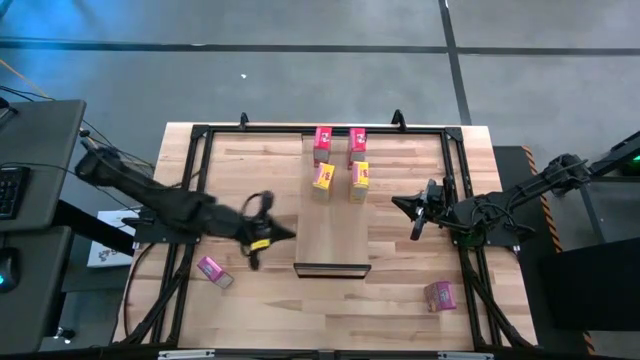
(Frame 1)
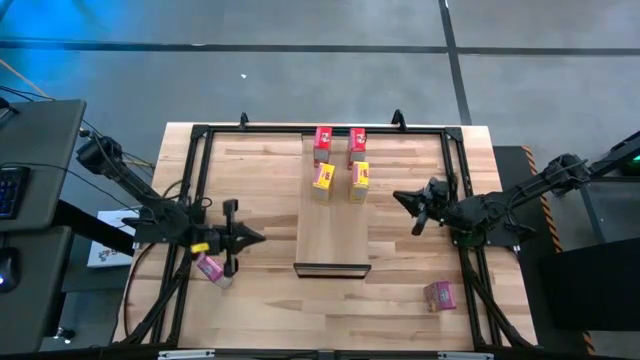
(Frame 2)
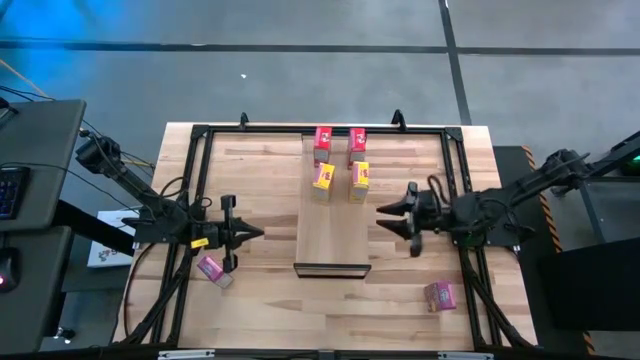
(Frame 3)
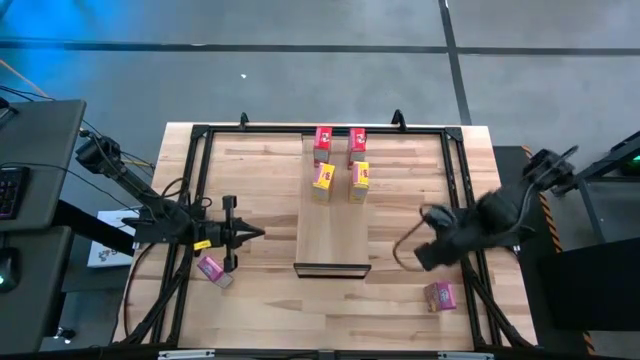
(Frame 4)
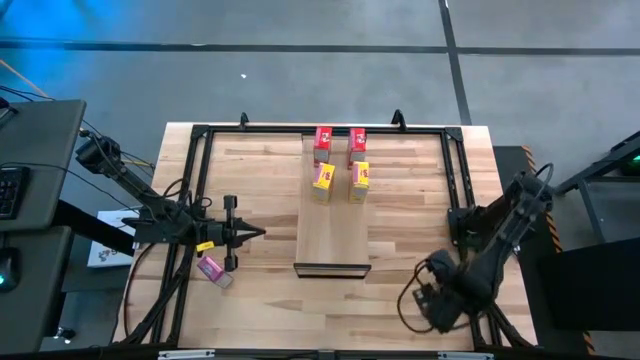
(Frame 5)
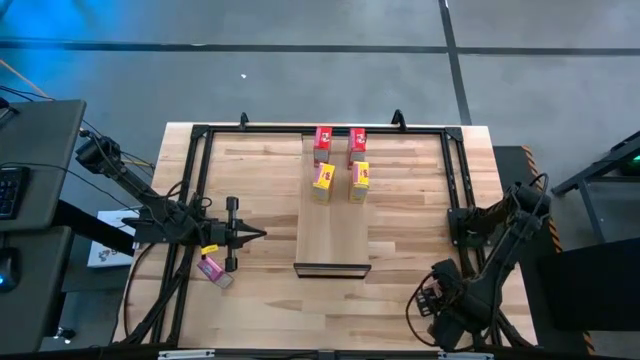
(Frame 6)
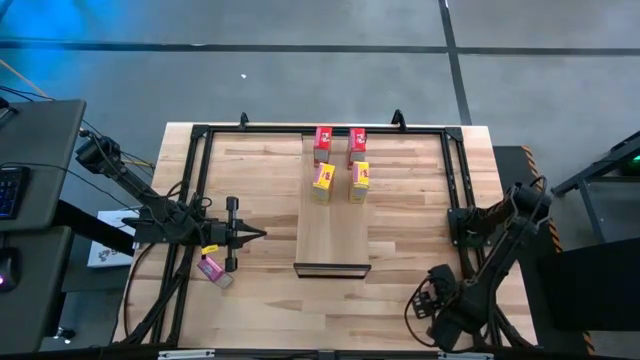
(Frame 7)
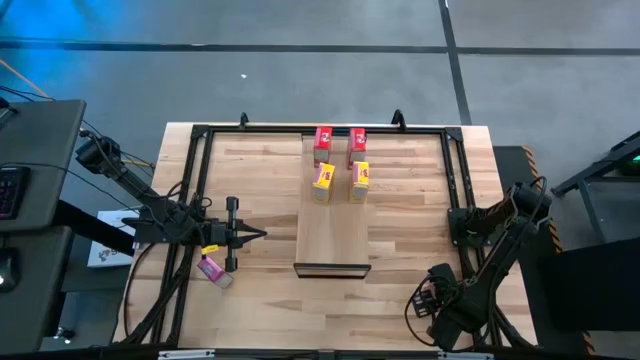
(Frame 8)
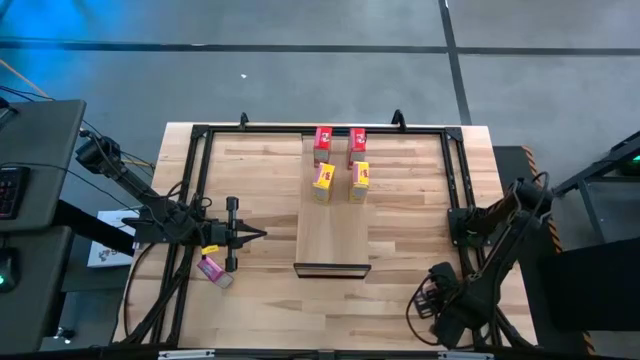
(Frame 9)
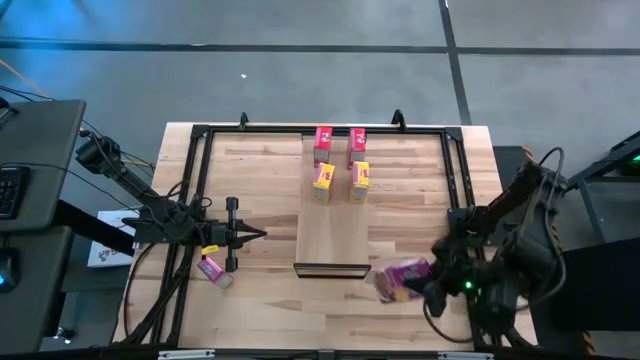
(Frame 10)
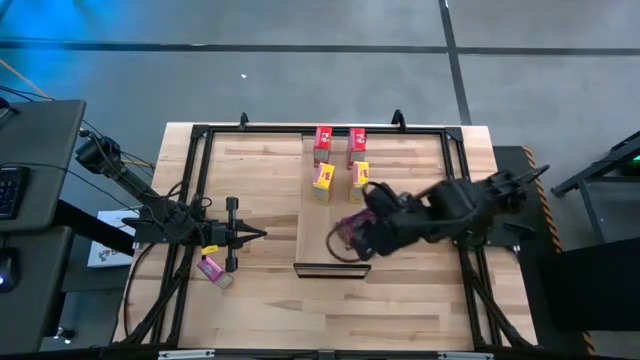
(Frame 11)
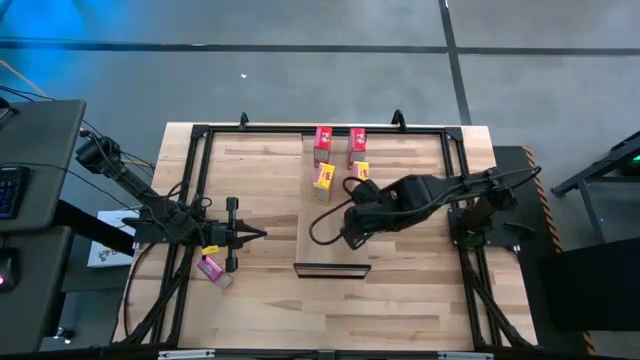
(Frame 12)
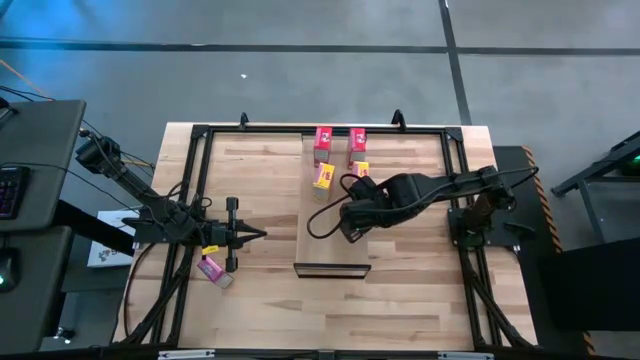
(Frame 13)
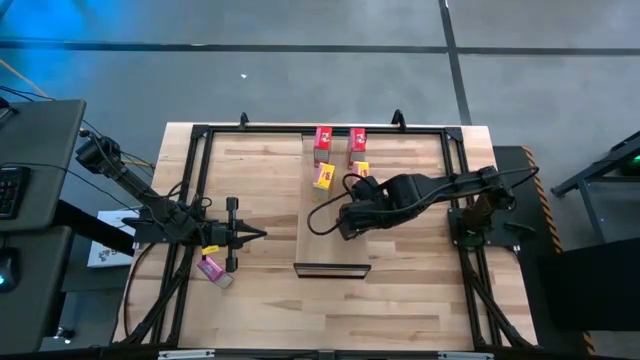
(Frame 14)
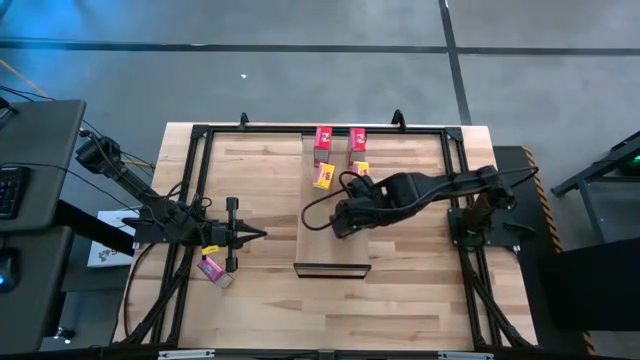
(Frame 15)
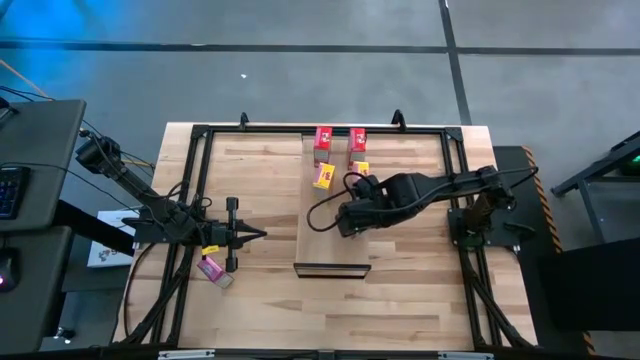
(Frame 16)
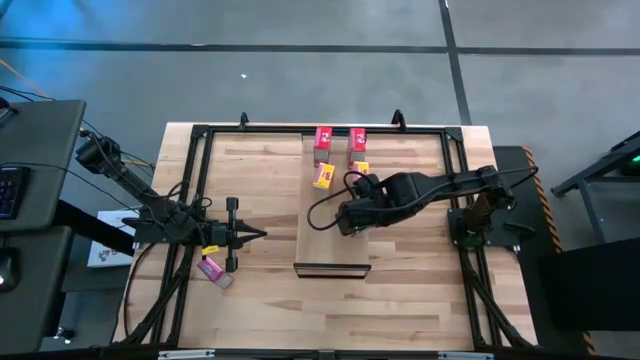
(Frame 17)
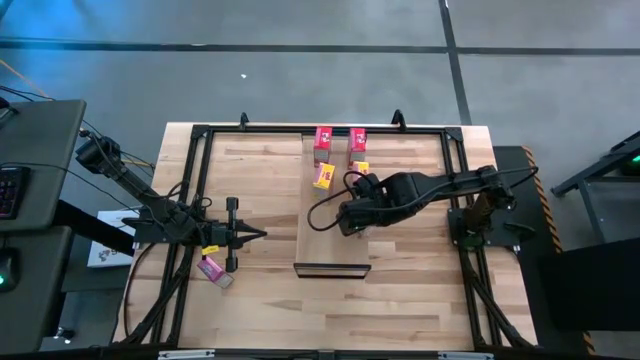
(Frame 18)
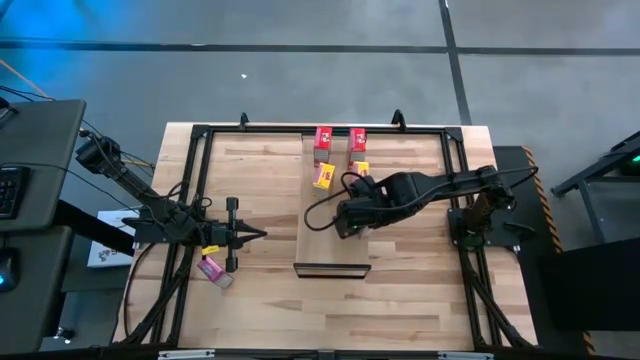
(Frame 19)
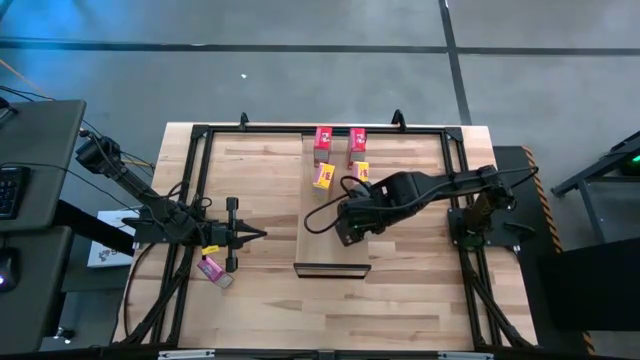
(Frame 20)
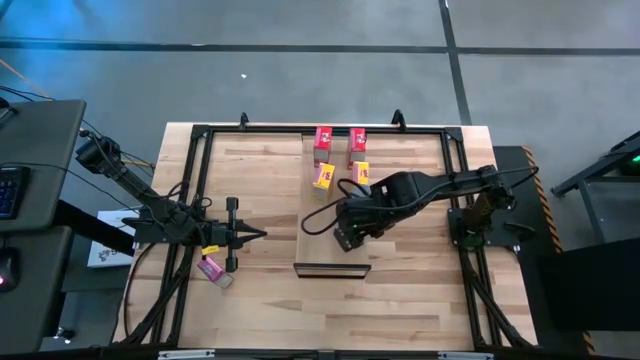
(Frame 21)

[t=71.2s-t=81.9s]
Task: Stack cereal on shelf
Put the right purple cereal box on the shelf

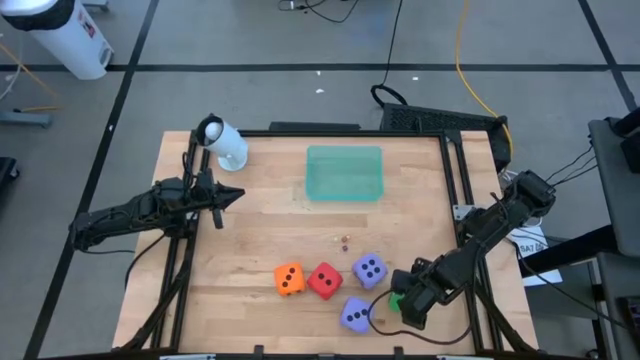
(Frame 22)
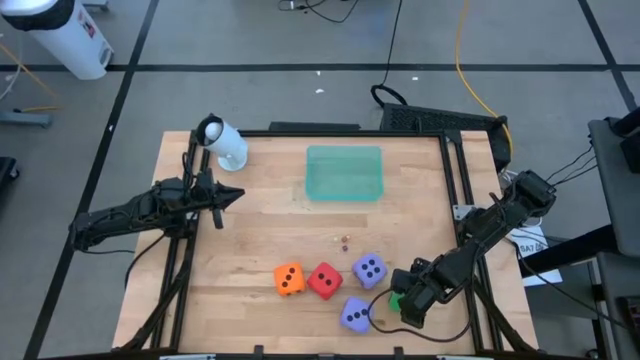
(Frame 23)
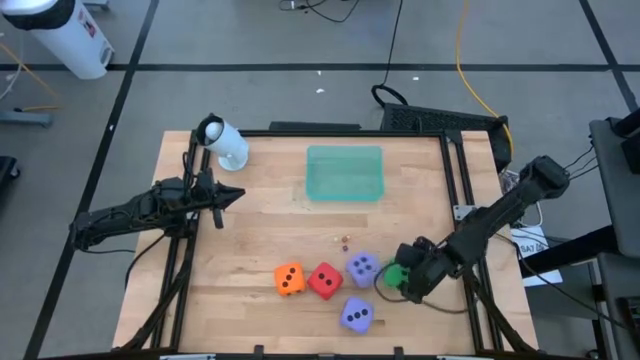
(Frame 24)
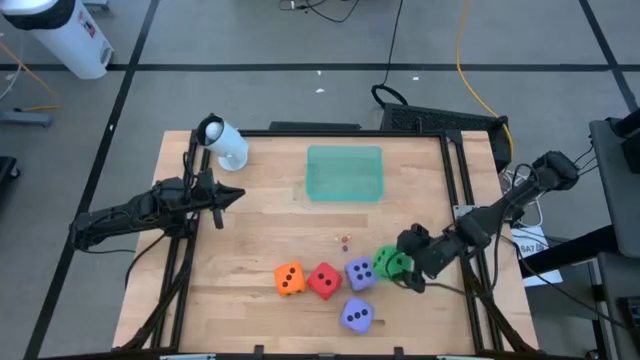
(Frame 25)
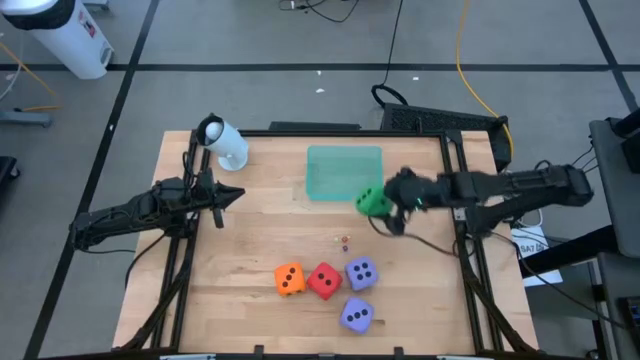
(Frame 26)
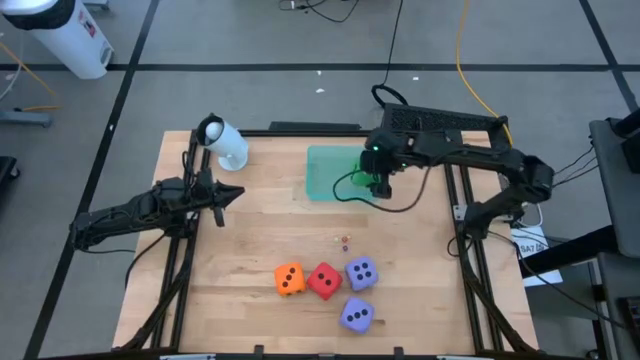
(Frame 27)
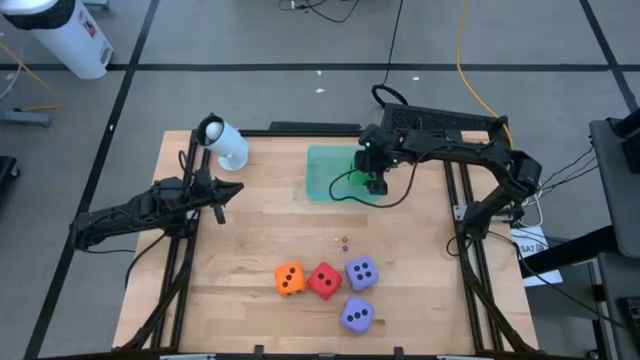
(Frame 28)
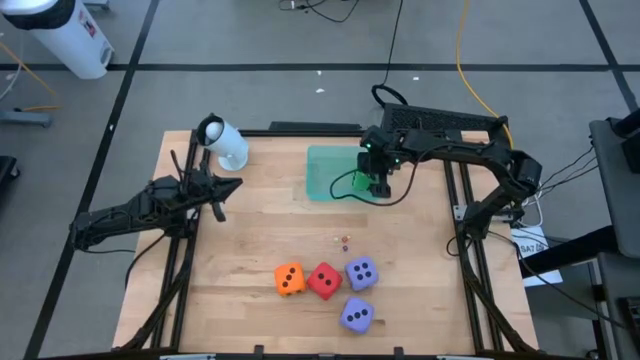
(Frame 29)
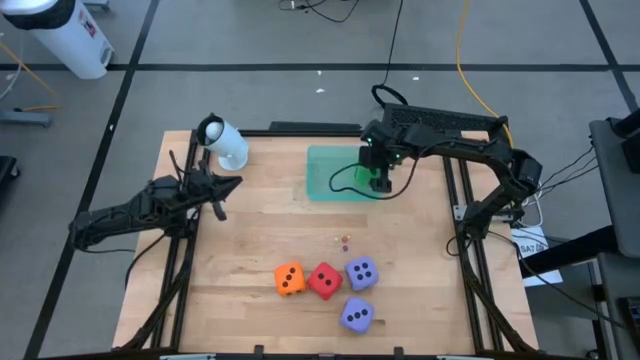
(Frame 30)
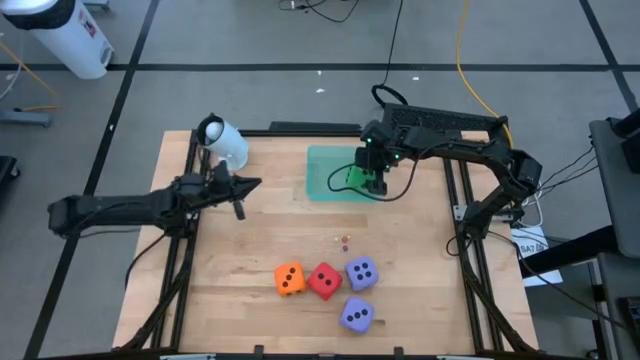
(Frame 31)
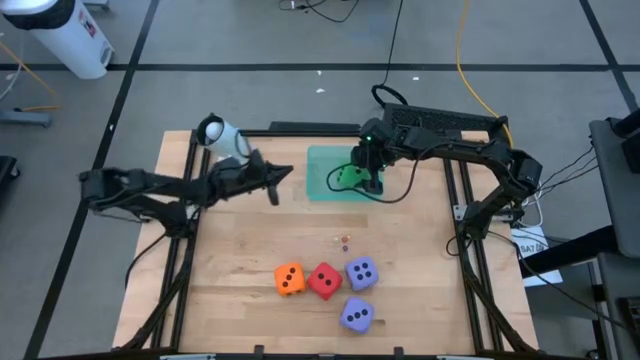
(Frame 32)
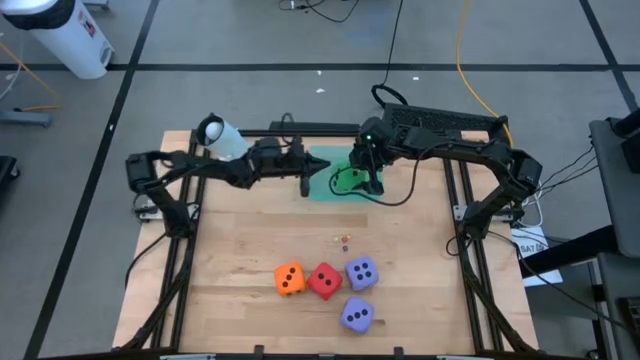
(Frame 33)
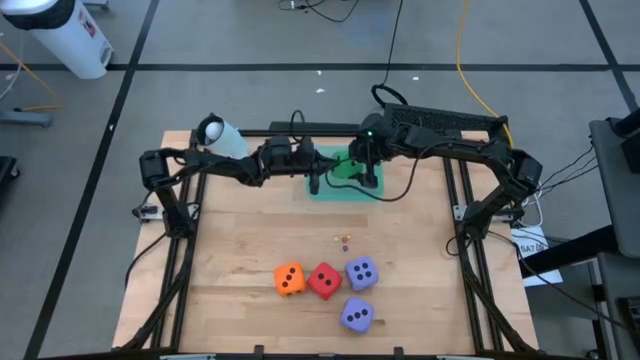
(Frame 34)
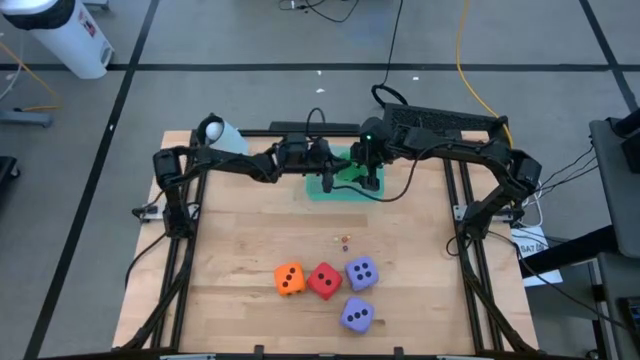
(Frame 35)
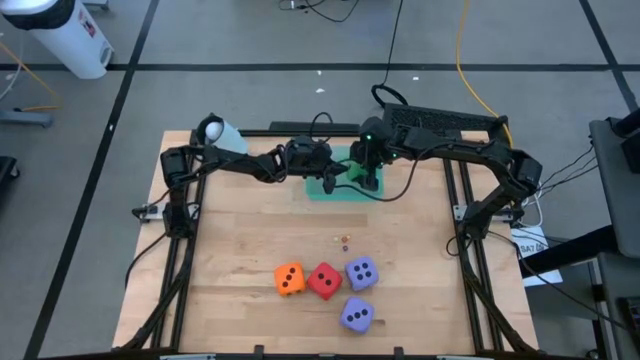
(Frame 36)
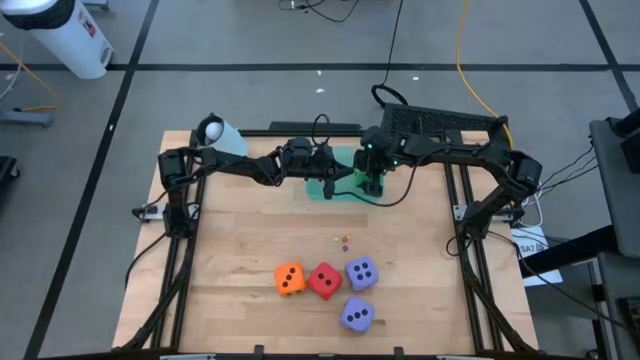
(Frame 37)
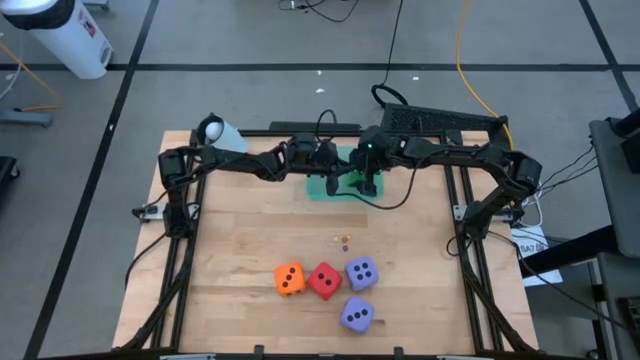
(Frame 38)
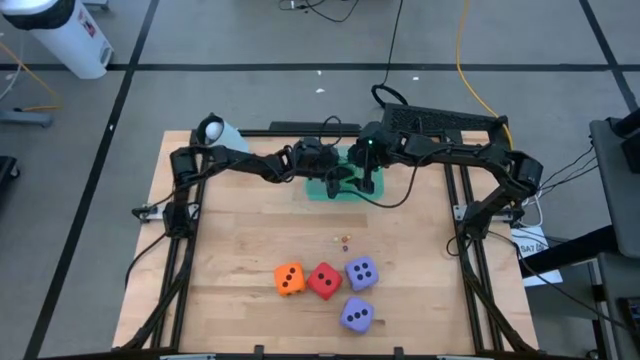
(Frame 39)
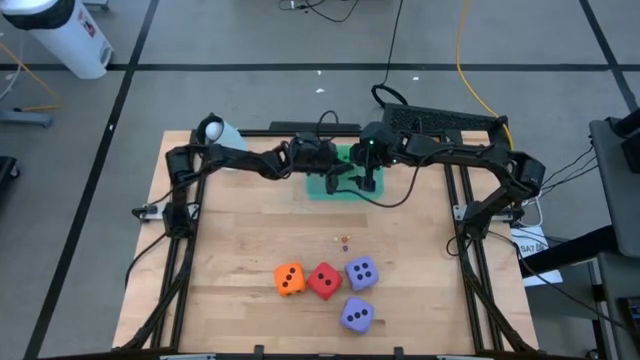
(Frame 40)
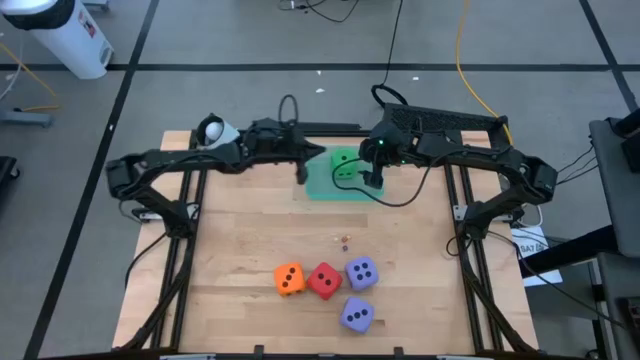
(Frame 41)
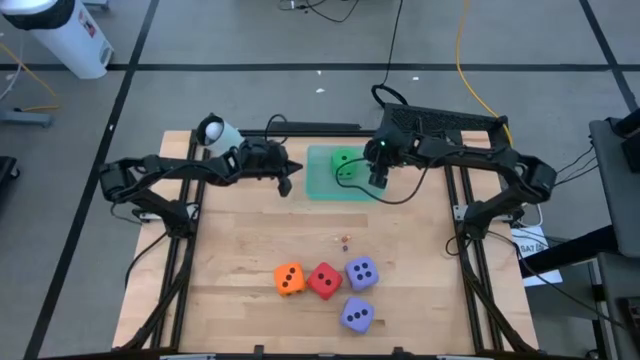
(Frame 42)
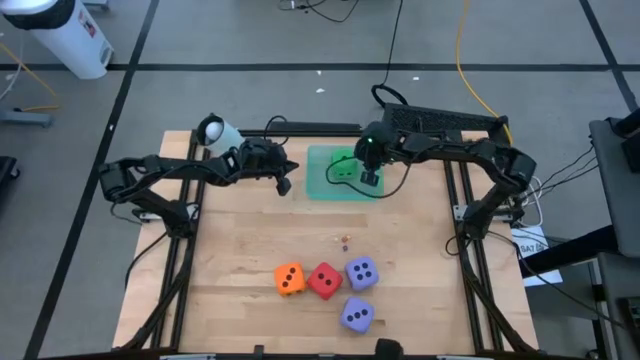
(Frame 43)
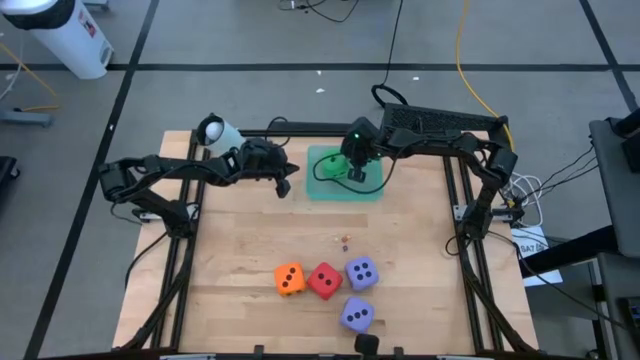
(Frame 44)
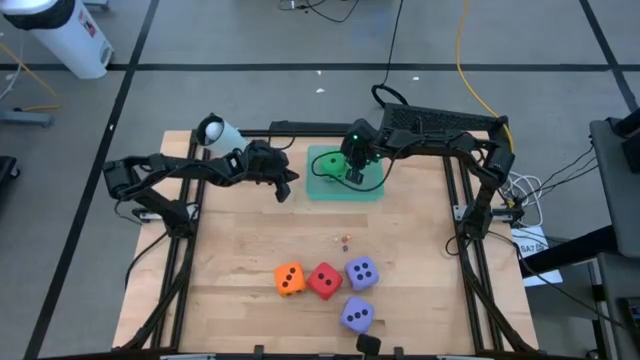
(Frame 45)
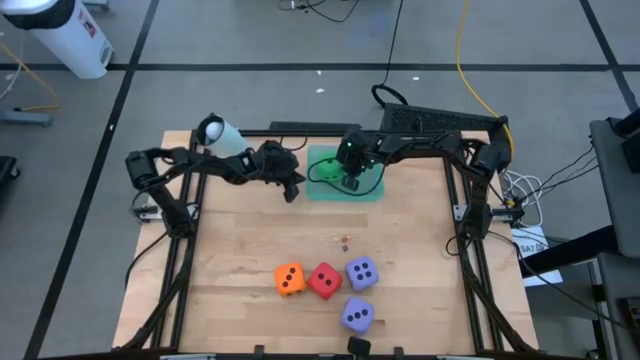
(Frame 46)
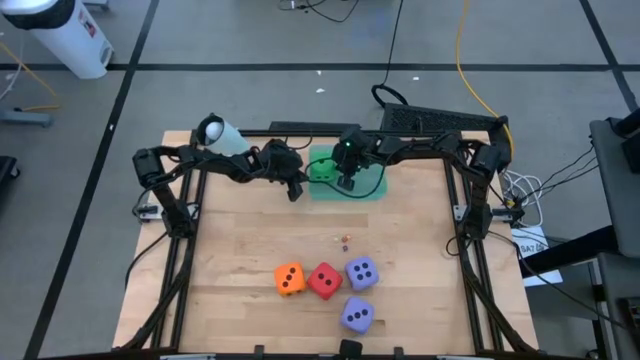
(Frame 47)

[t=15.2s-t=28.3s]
Task: Pick & Place Dice
Put the large green dice into the blue bin
